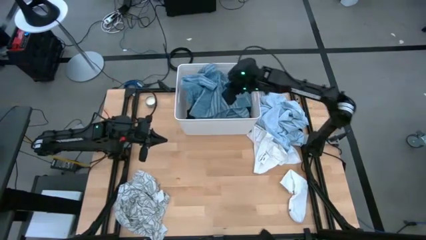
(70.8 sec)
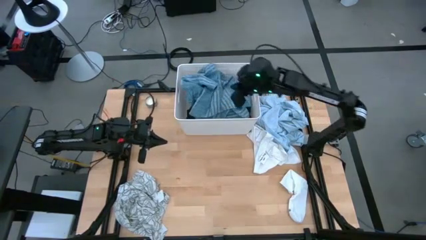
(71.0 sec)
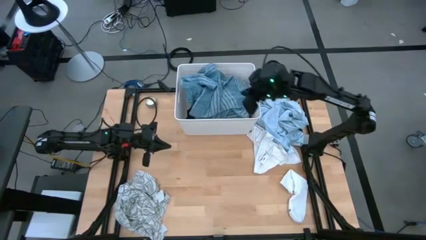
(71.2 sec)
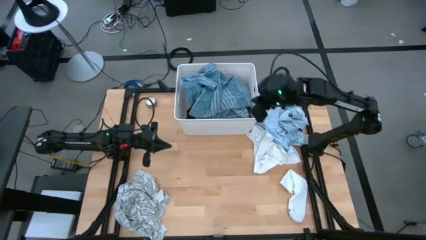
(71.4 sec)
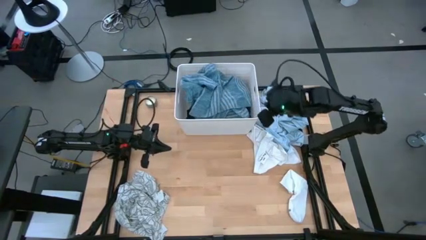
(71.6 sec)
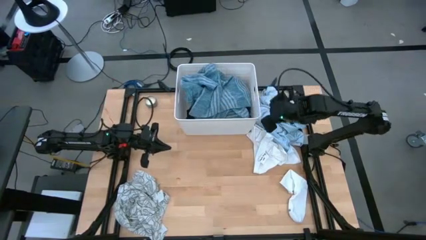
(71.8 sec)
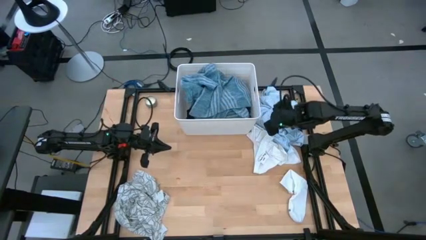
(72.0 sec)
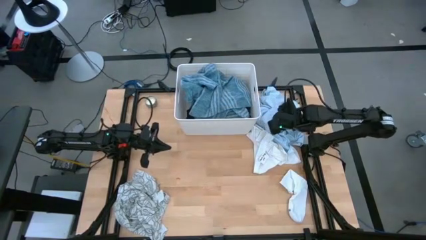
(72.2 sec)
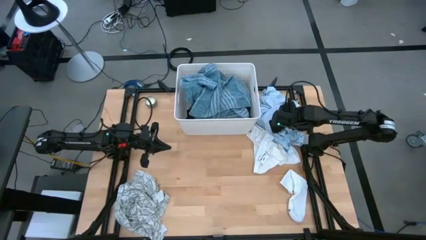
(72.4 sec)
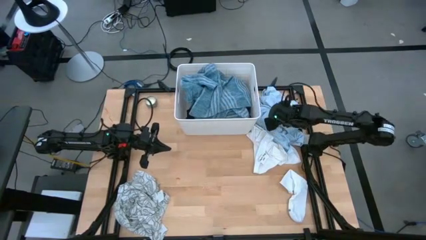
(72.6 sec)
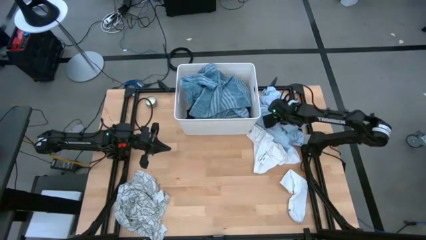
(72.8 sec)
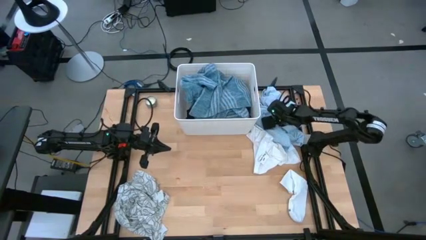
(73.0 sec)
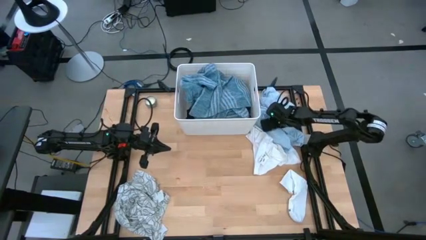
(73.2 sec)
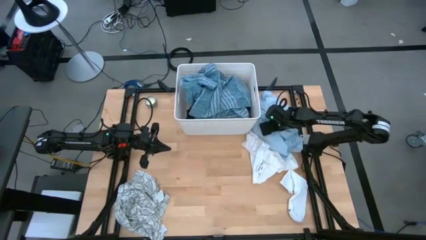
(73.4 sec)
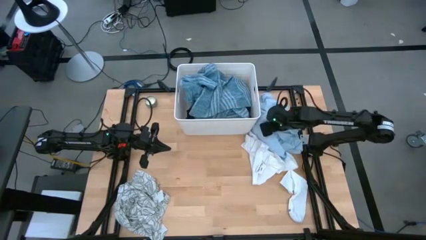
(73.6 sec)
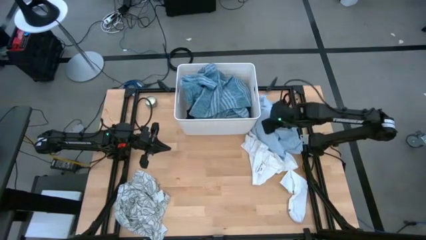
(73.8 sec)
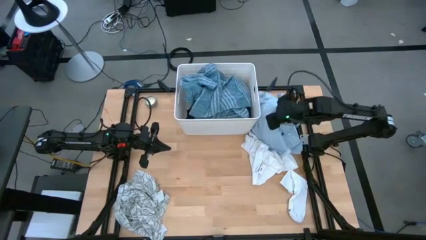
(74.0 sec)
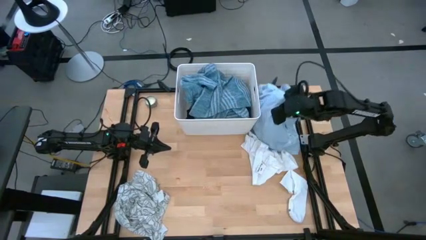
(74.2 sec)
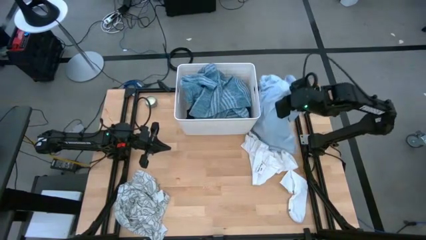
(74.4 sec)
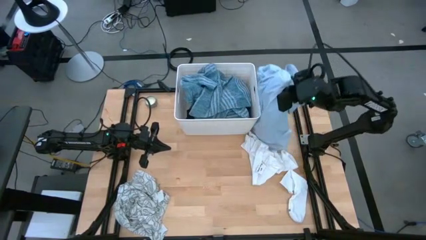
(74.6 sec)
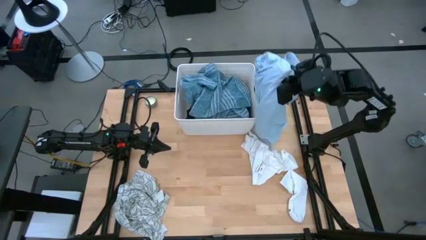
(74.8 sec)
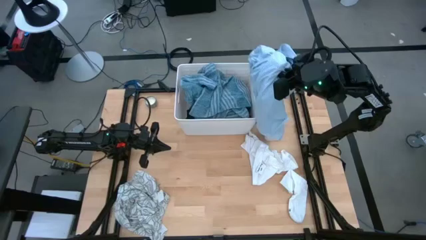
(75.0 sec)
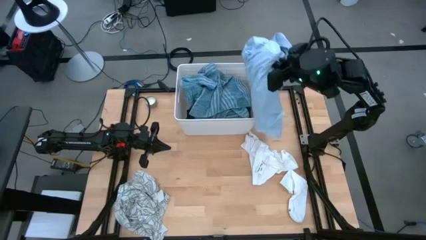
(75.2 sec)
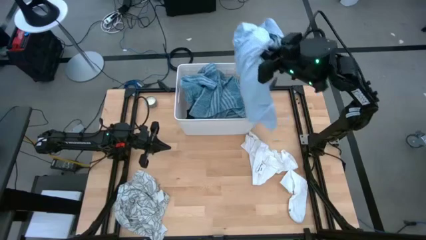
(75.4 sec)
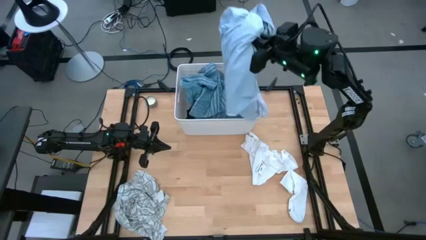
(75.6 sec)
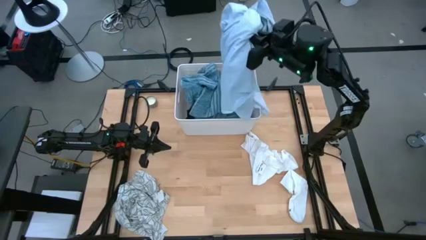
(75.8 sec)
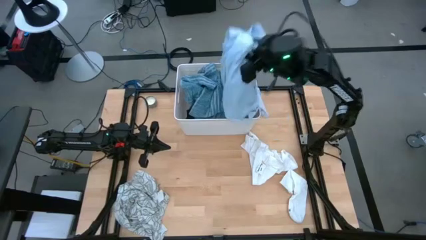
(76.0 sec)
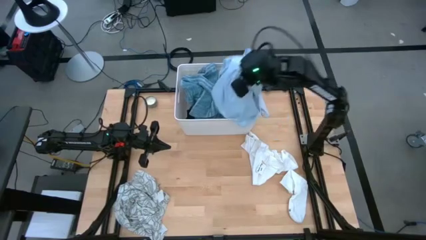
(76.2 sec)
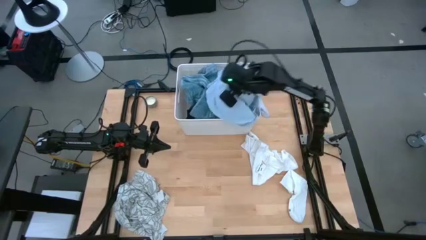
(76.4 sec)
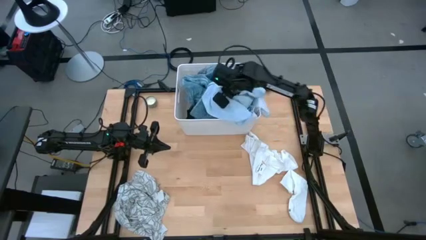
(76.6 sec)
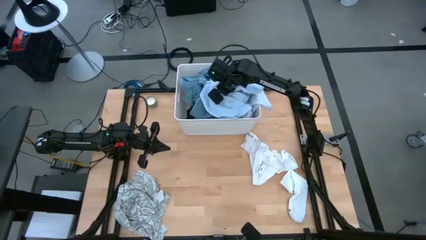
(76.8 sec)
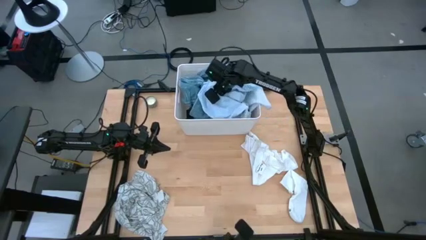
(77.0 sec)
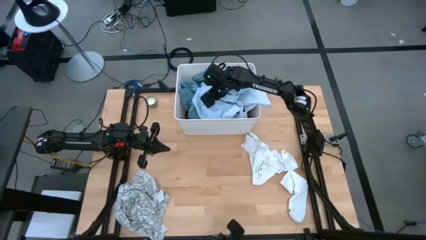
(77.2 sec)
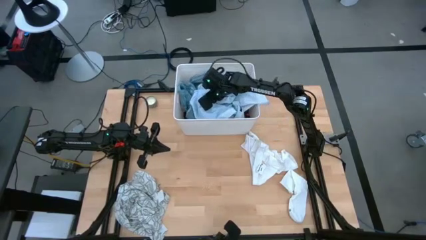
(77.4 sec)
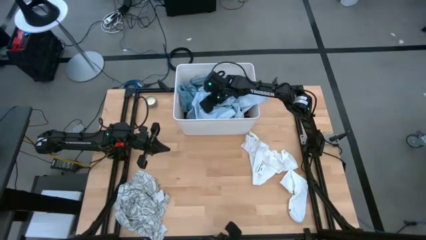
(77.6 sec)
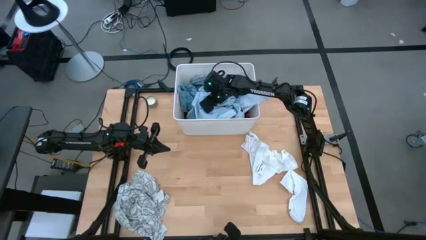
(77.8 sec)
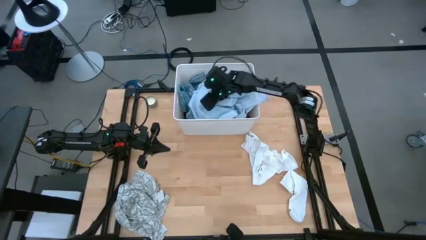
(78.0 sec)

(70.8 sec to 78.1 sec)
Task: Sort clothes
Put the light blue polo shirt into the laundry bin

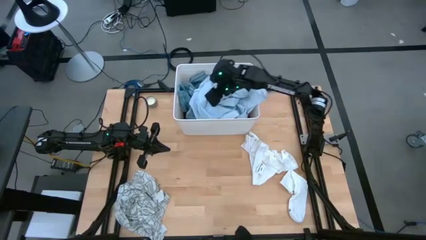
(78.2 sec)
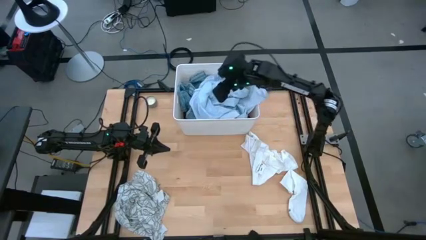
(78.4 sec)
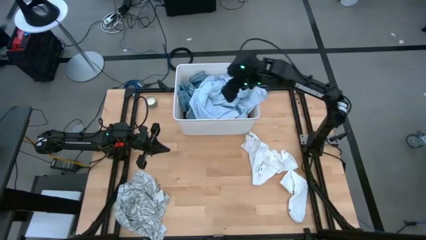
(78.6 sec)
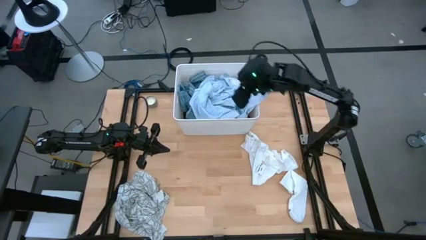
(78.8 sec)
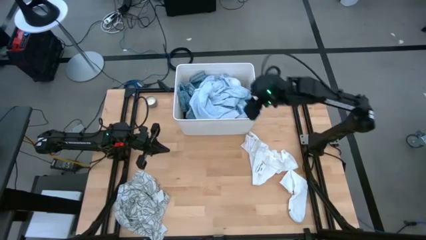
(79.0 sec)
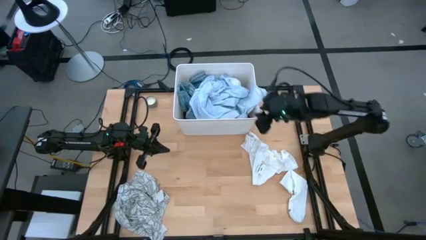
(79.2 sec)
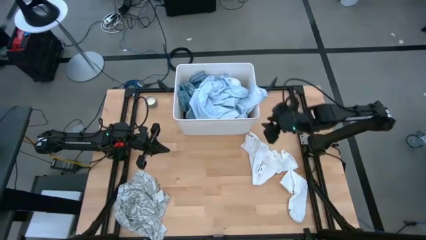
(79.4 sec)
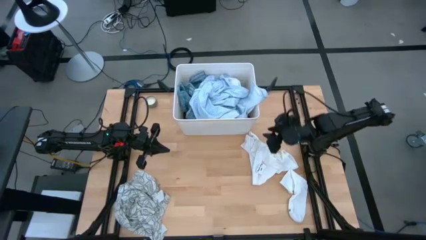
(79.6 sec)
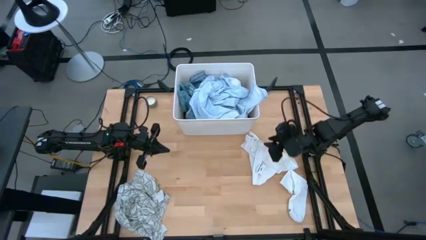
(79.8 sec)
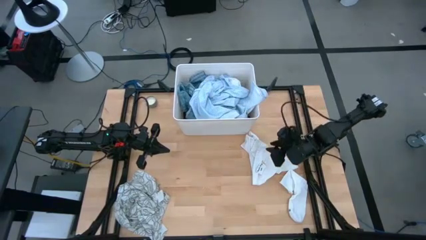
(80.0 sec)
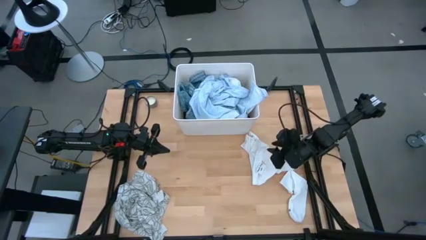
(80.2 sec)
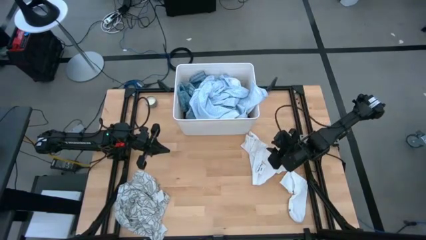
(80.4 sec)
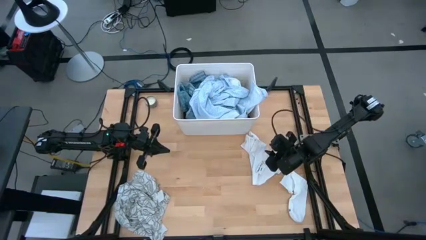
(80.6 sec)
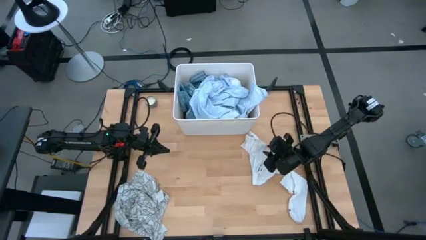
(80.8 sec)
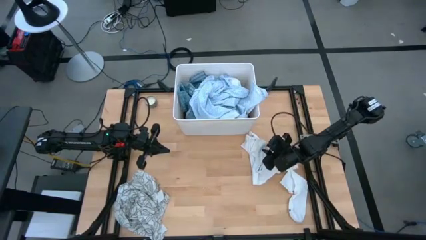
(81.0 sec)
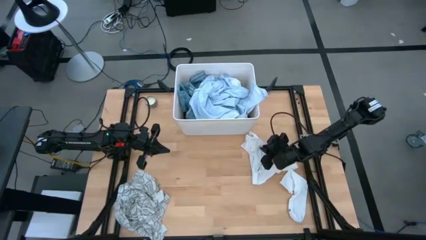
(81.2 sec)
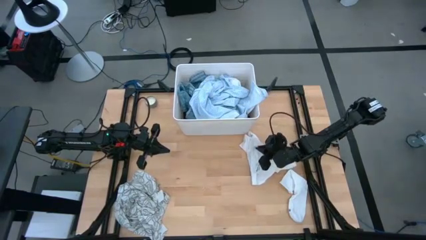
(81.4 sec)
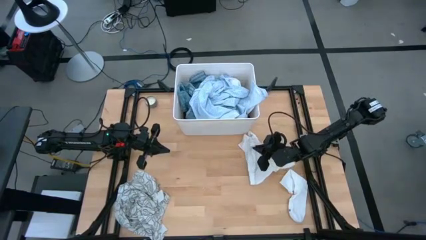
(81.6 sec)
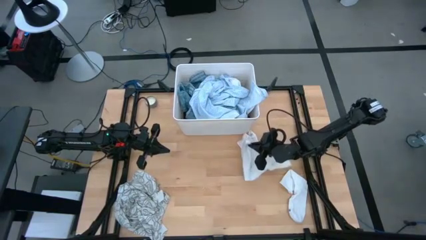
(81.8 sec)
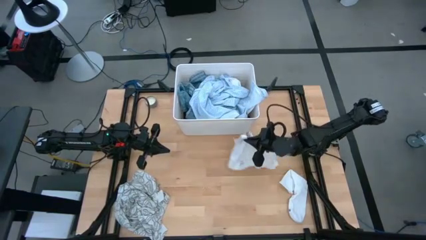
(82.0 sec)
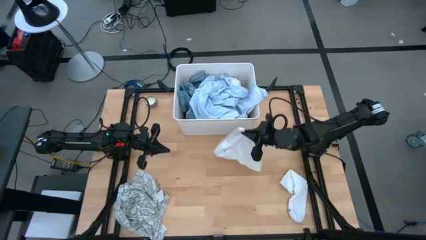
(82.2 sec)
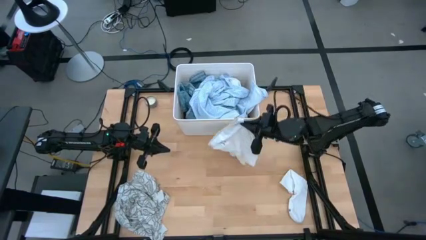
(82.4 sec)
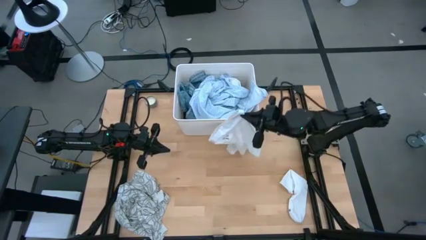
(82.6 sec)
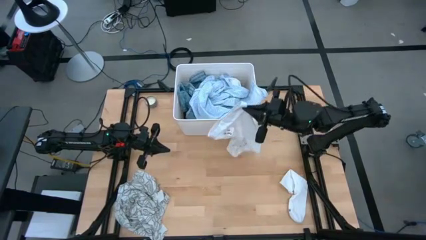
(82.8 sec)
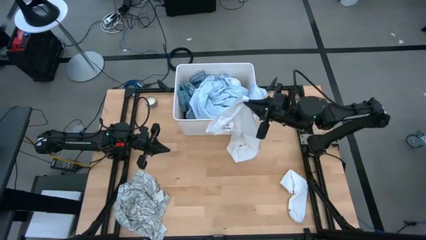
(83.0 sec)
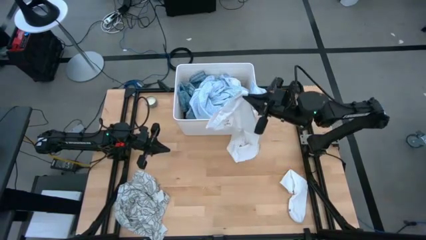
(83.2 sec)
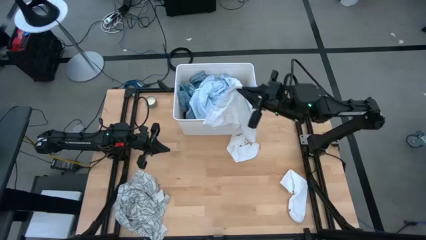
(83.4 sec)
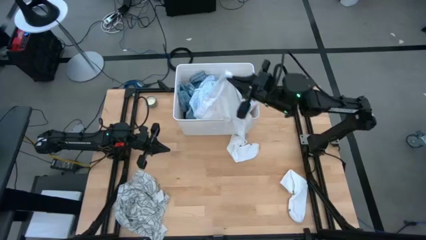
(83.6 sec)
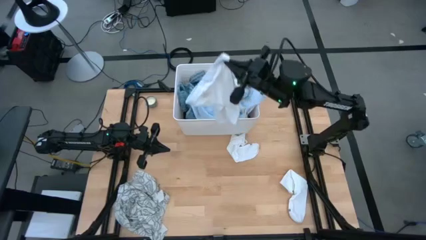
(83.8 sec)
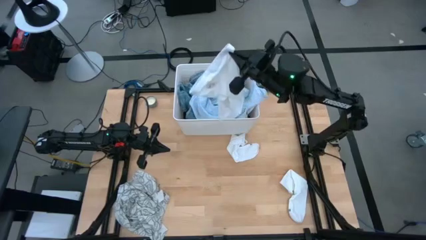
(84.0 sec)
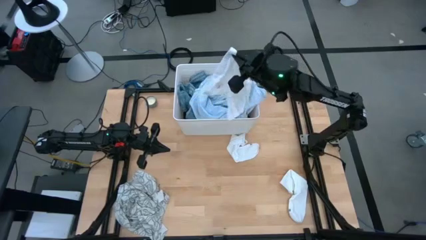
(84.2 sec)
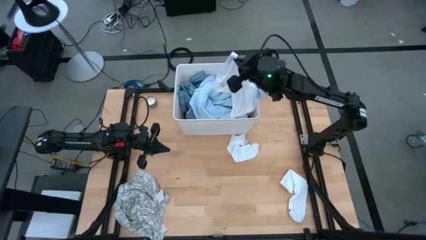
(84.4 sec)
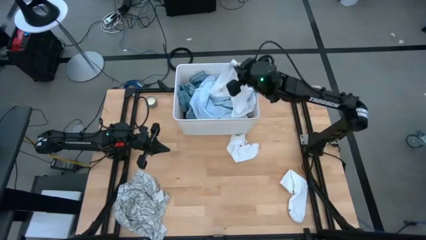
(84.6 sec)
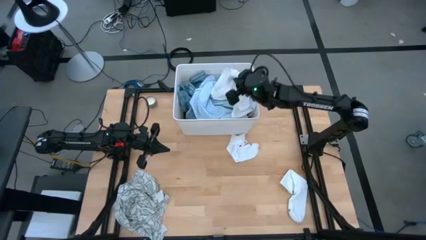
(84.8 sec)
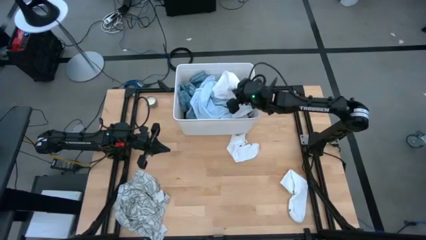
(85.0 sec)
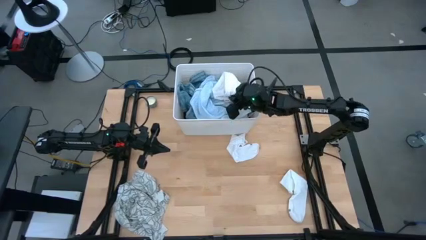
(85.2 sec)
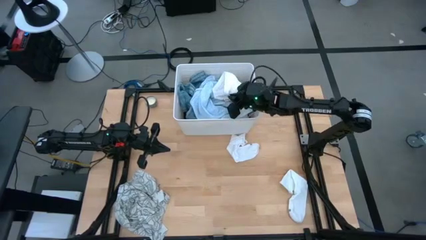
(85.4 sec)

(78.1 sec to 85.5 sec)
Put the white underwear into the laundry bin

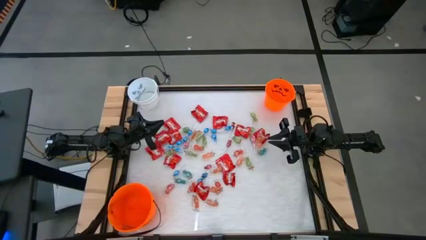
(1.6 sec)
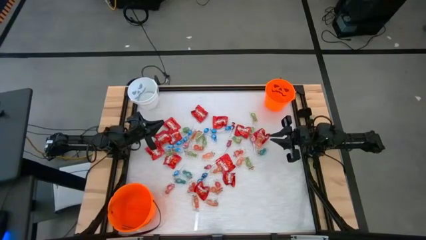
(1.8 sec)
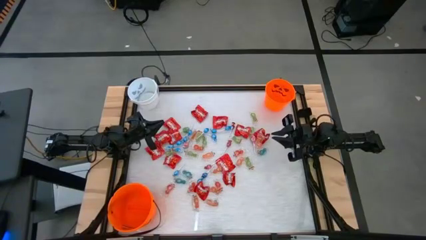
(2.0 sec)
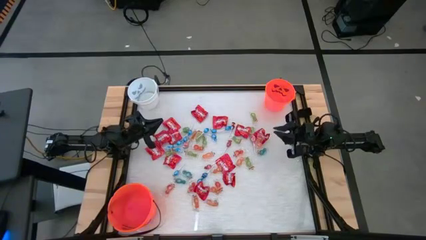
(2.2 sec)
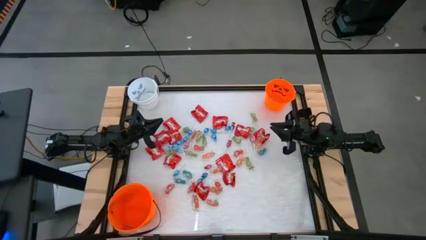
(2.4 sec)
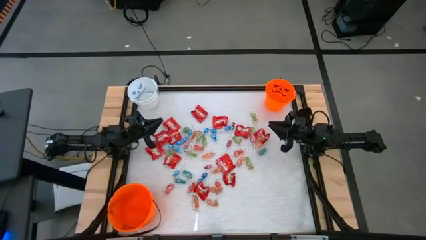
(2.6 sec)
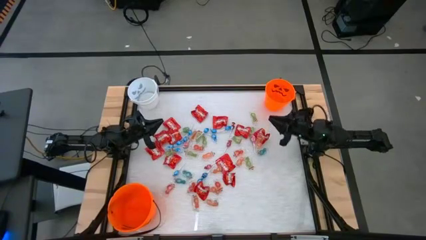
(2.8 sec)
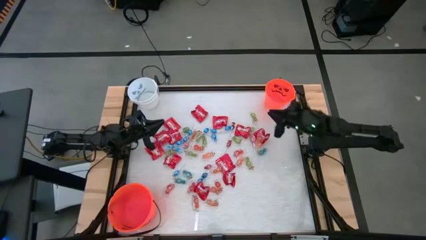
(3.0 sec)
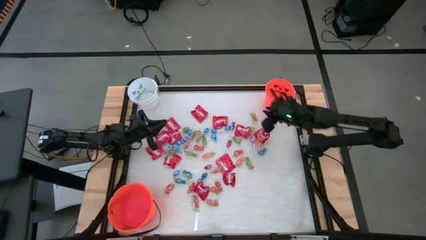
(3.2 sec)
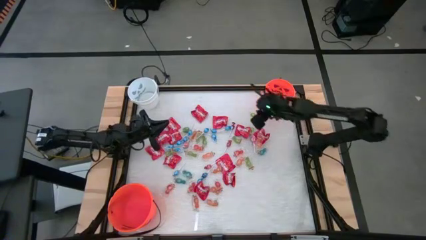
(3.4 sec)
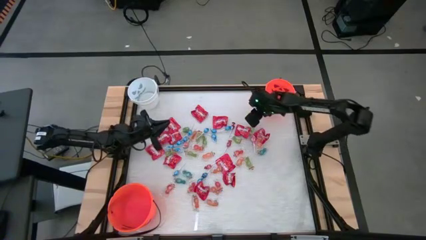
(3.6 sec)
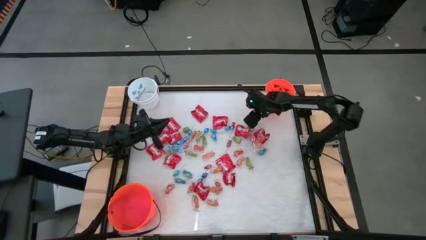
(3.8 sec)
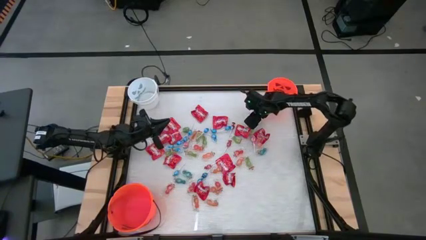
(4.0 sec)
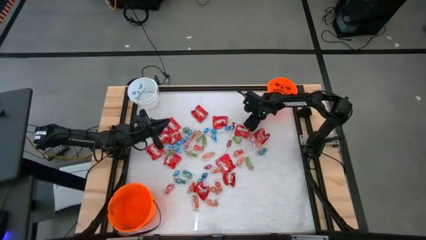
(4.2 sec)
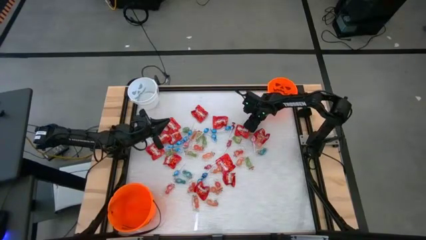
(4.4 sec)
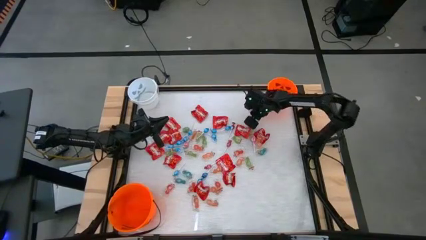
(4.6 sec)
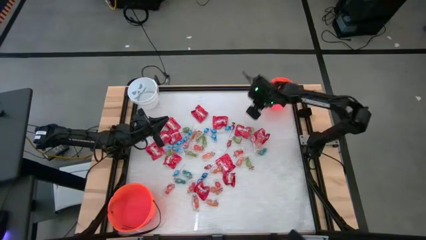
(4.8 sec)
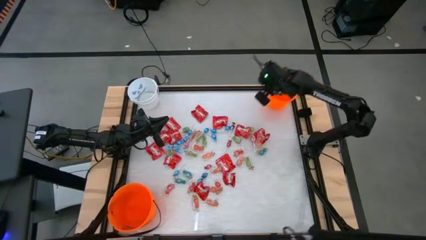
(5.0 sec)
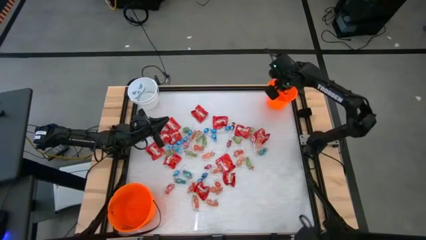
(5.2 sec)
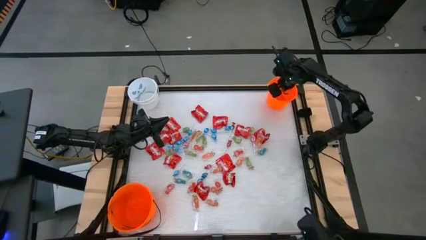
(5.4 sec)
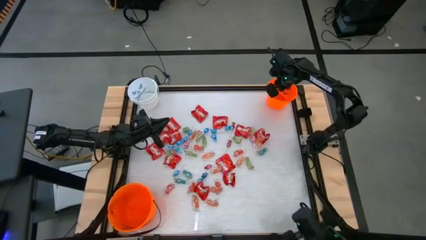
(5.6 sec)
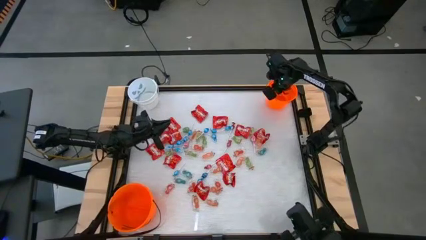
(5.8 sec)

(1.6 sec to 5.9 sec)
Task: Sort candy by brand, put in halloween buckets
Put the green gummy into the top orange bucket
